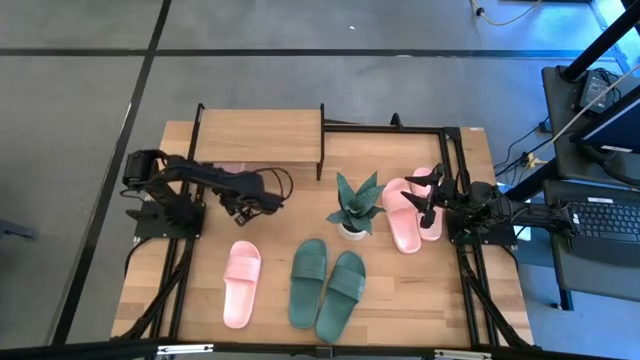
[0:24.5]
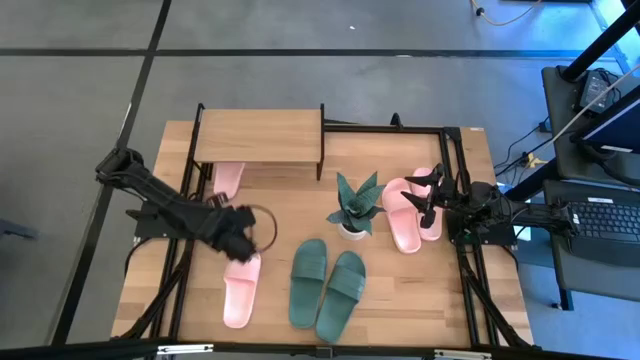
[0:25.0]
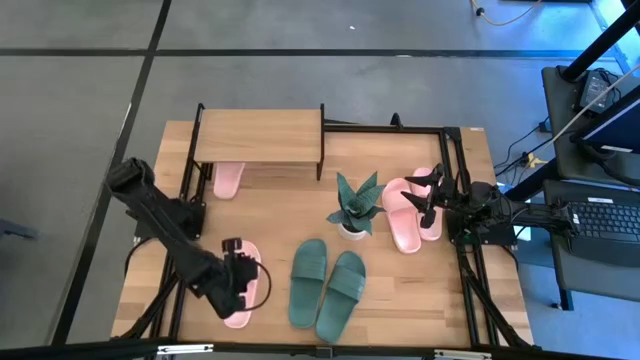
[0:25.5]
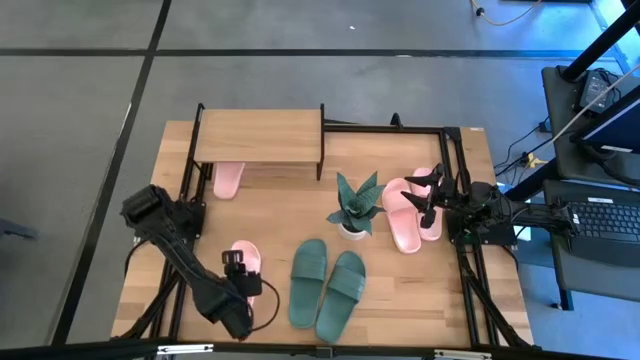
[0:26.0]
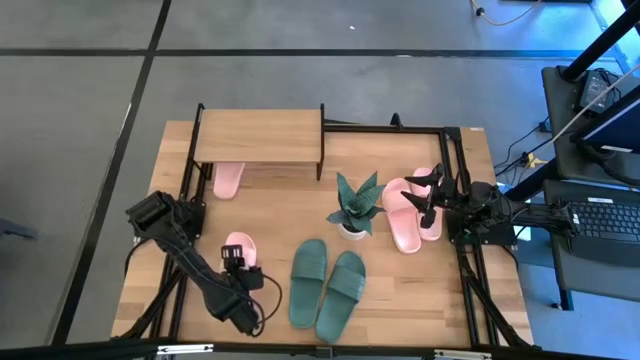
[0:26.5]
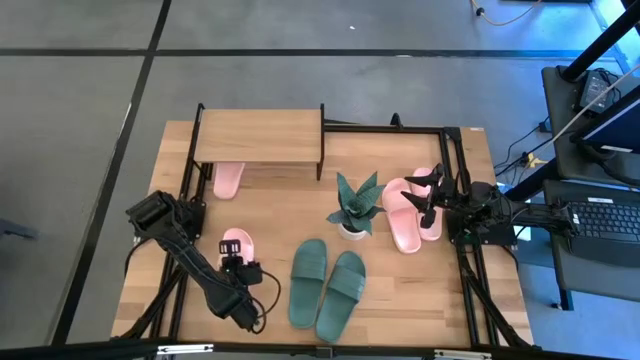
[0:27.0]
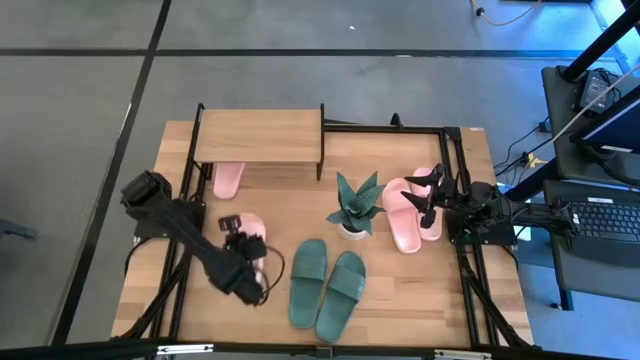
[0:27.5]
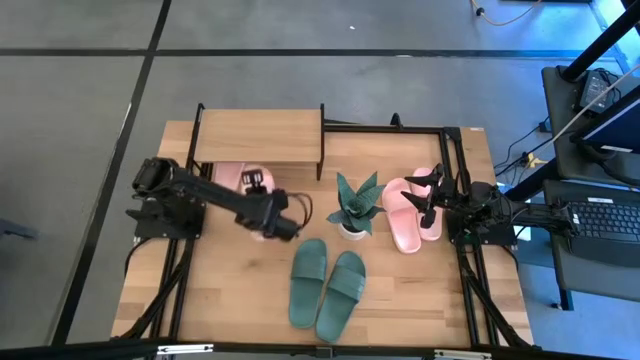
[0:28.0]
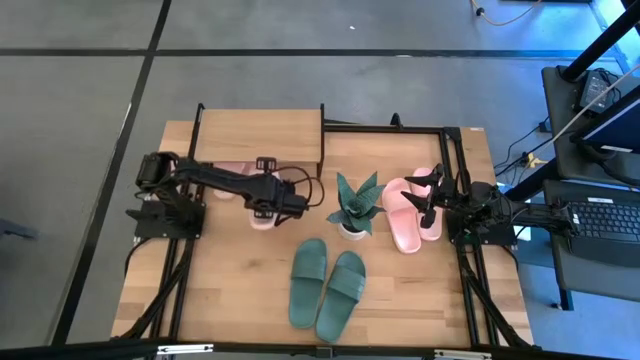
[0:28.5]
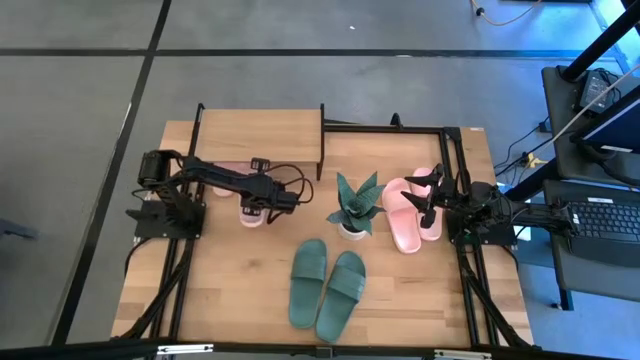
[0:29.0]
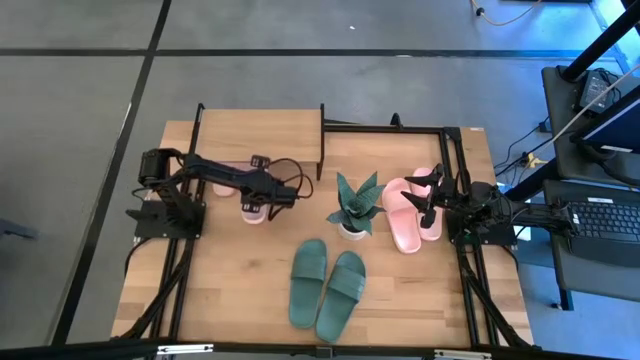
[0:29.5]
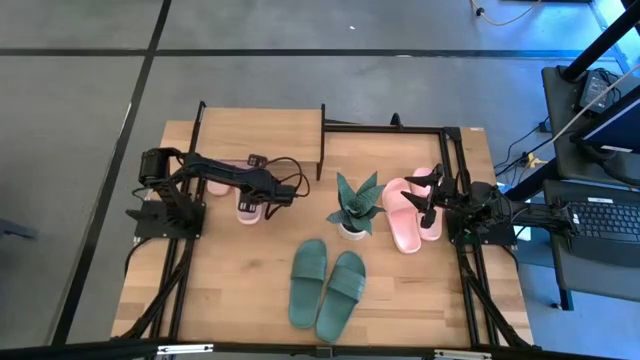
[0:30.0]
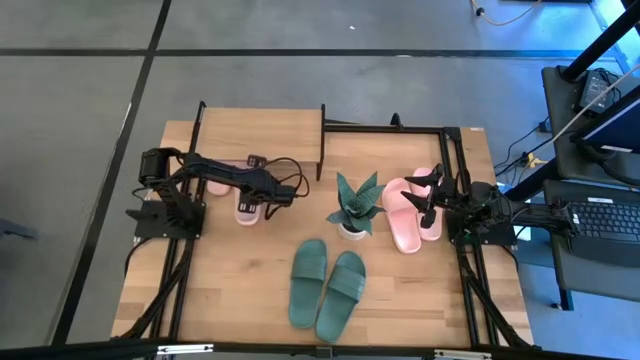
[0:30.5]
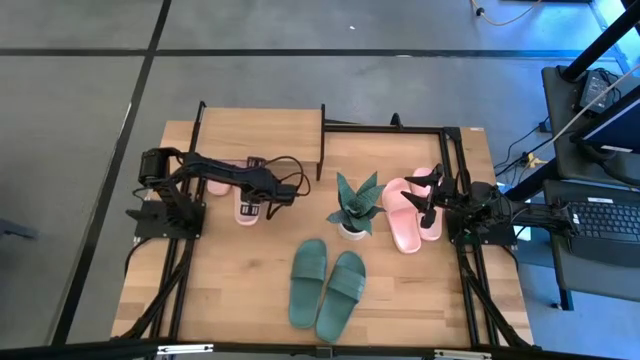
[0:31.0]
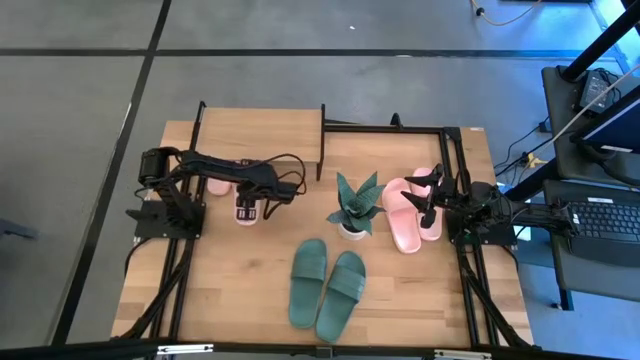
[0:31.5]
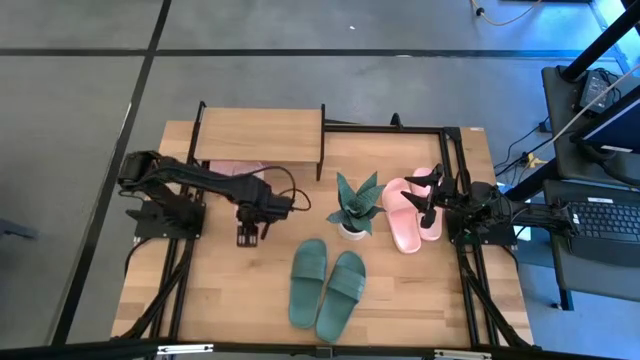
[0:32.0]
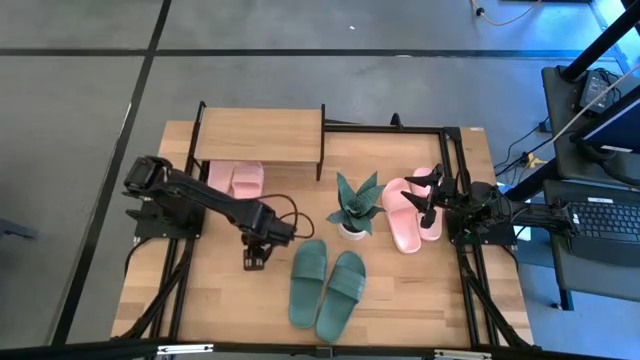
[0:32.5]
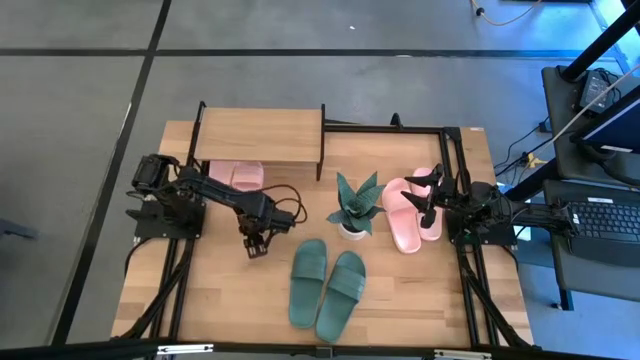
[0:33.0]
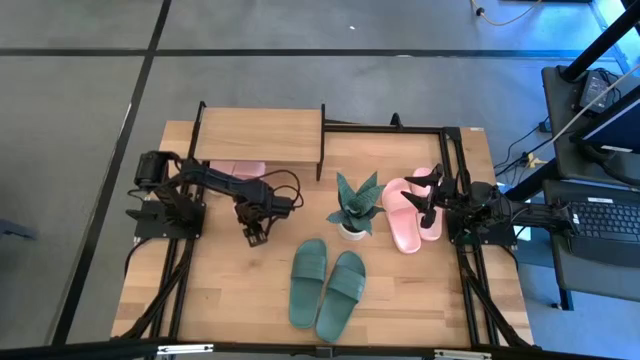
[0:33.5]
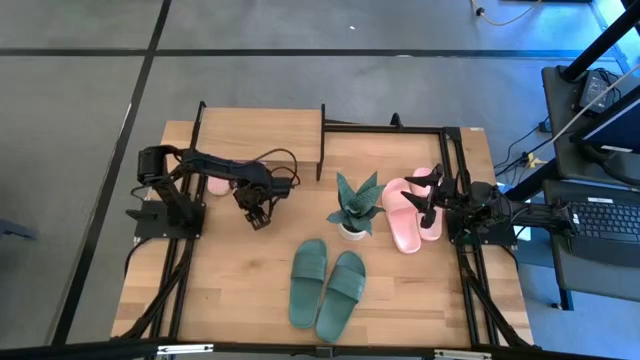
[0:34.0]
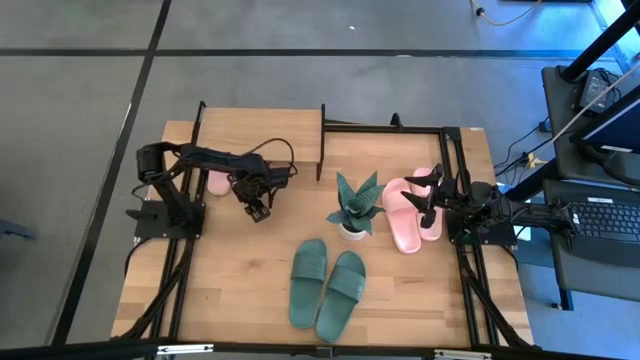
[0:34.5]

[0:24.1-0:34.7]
Task: Pick and place slides into the shelf
Put the pink slipper under the shelf

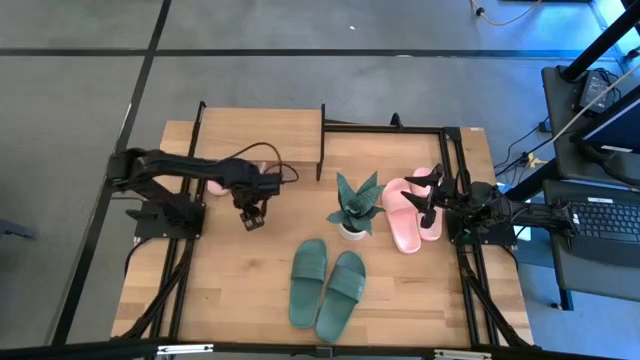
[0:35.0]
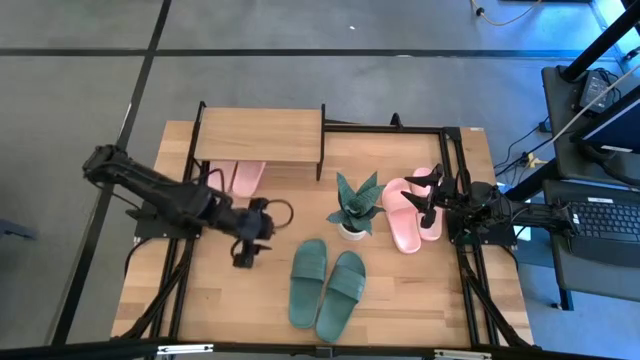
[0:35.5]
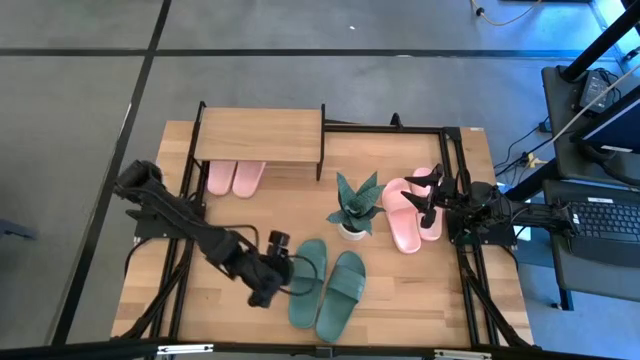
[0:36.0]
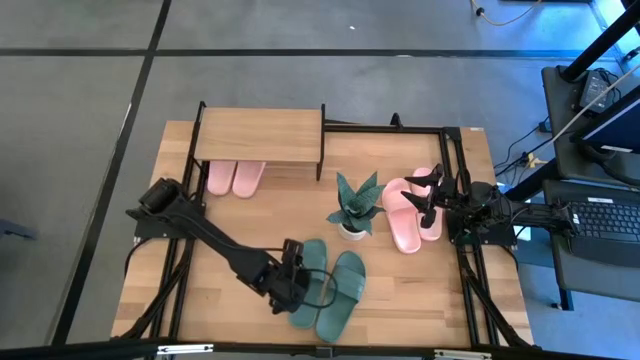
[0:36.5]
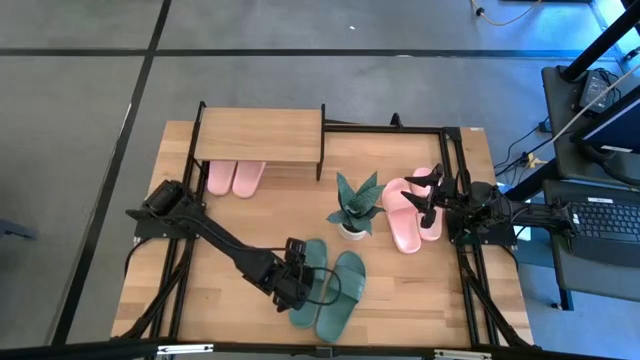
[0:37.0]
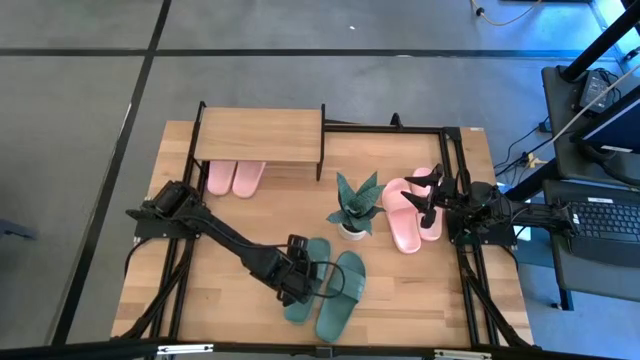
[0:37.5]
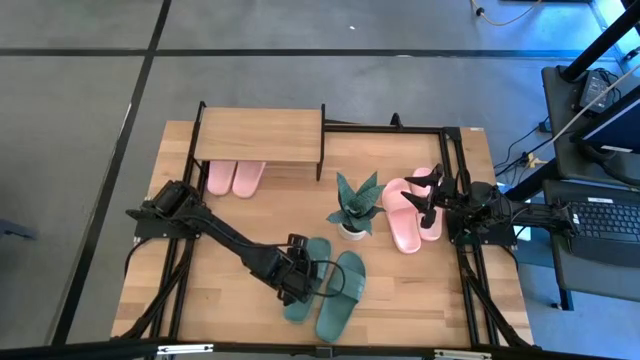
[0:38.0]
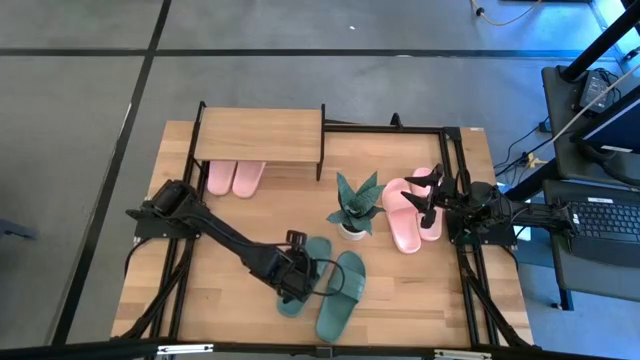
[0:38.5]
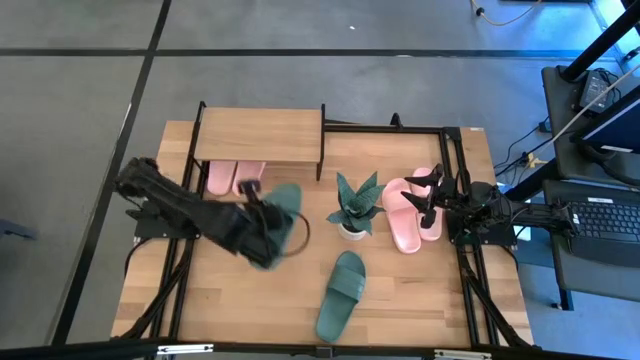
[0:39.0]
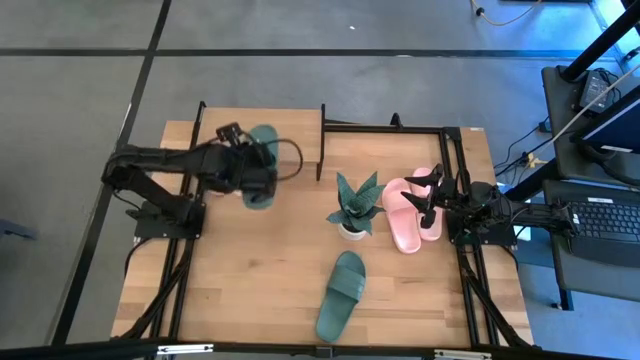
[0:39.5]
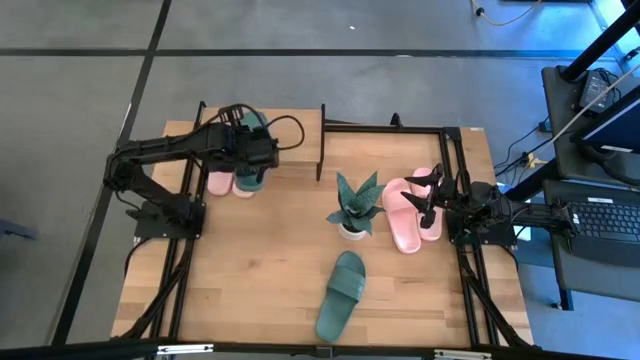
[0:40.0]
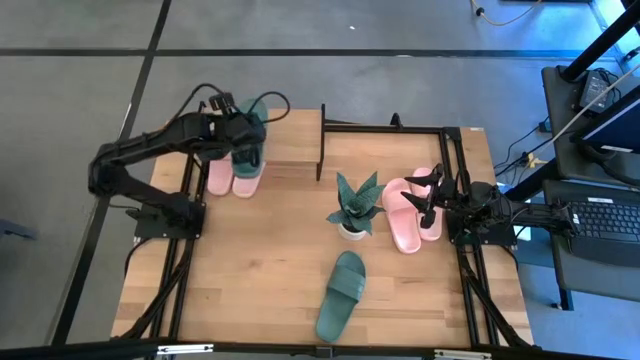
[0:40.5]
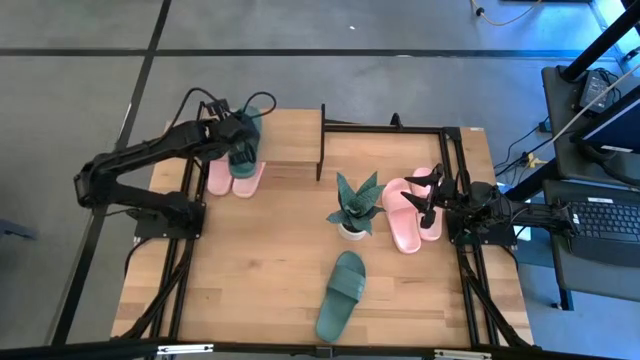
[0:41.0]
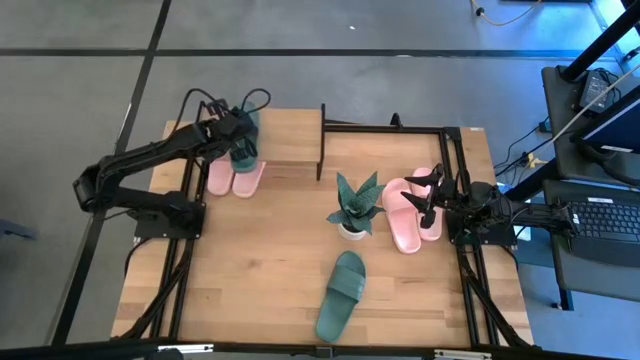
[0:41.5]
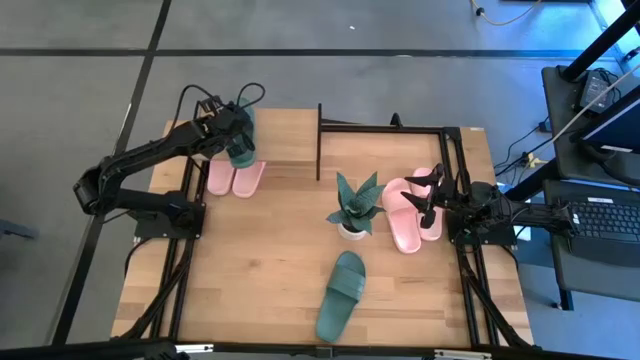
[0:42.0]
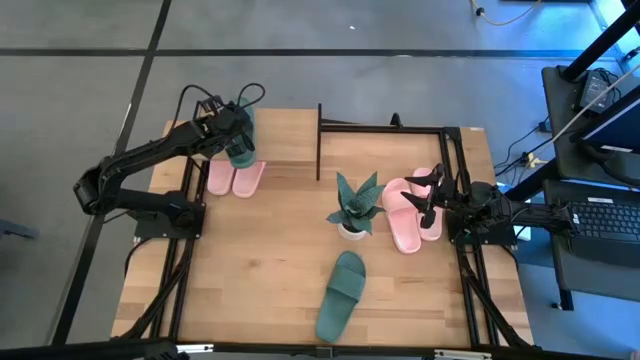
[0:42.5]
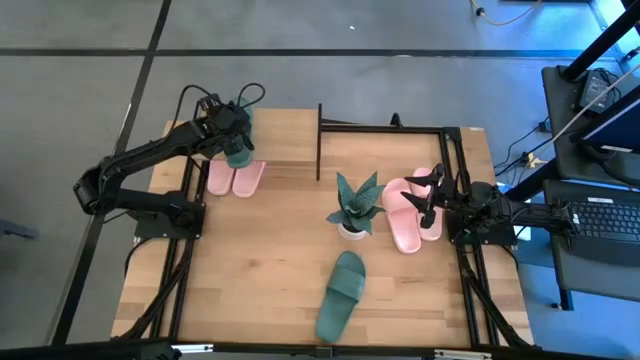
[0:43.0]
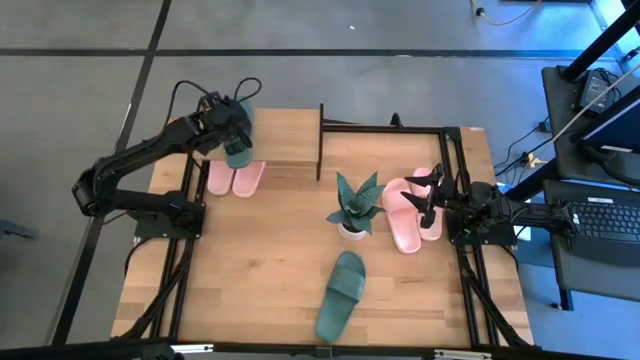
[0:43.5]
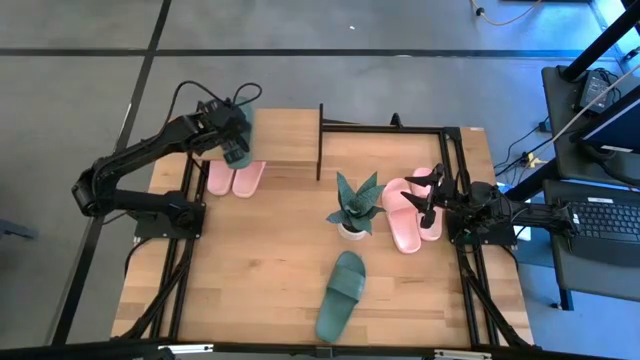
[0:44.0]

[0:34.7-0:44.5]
Put the green slipper on the shelf
